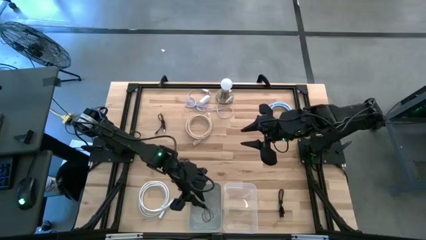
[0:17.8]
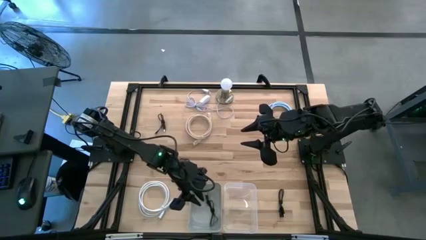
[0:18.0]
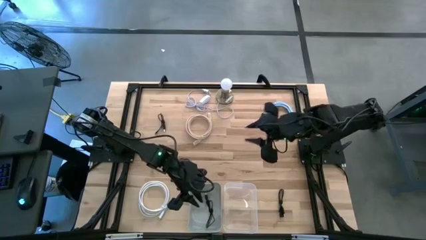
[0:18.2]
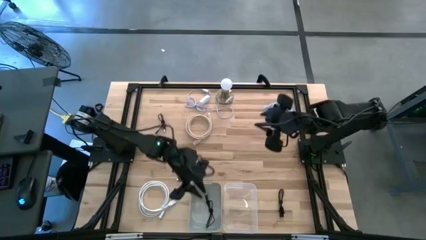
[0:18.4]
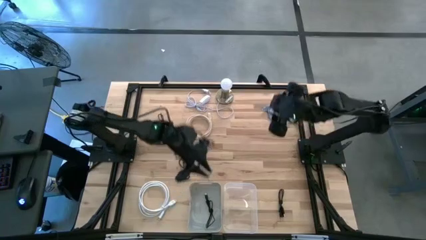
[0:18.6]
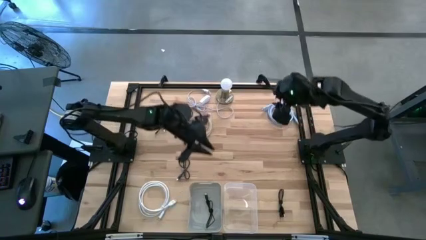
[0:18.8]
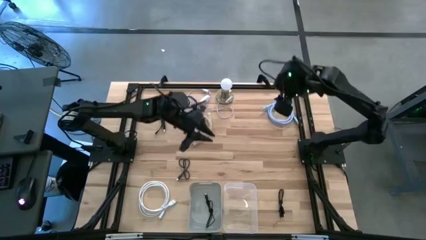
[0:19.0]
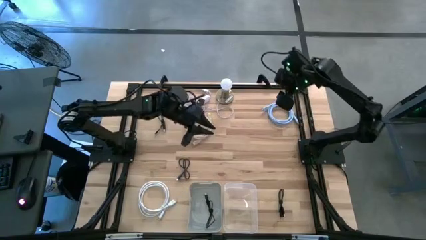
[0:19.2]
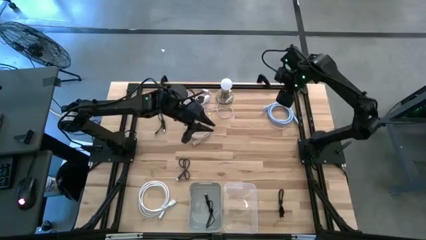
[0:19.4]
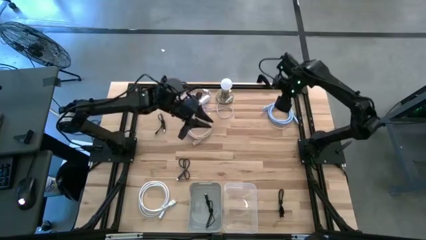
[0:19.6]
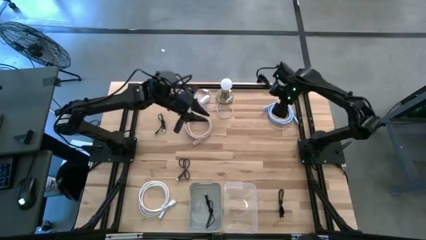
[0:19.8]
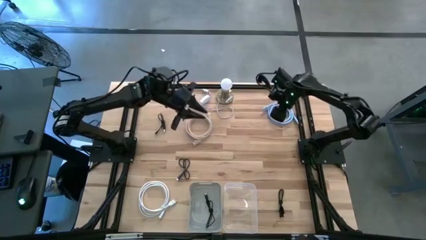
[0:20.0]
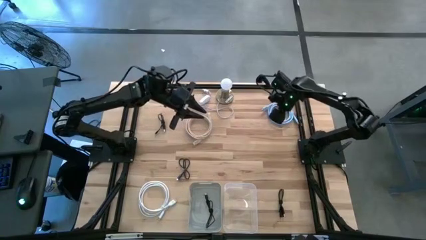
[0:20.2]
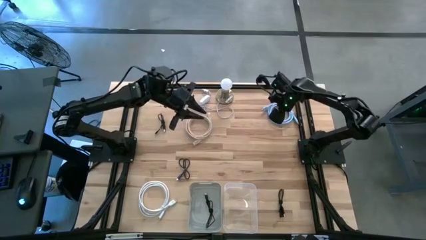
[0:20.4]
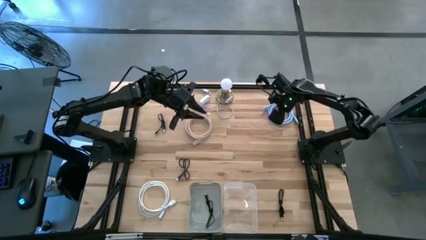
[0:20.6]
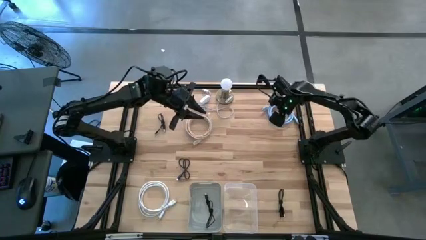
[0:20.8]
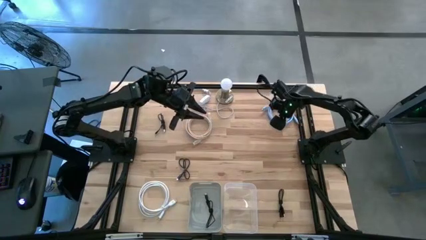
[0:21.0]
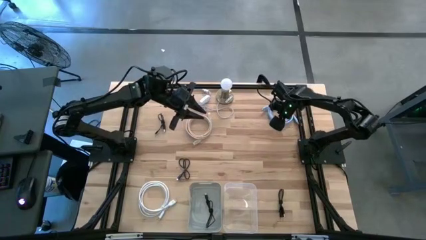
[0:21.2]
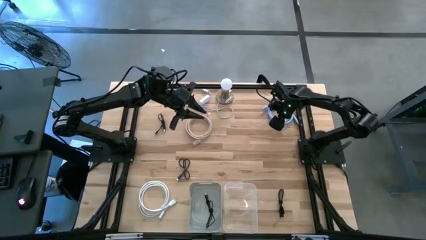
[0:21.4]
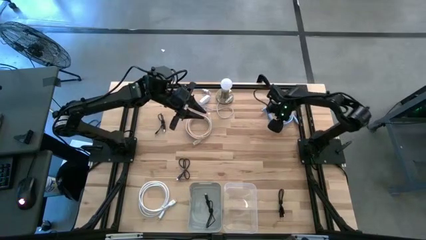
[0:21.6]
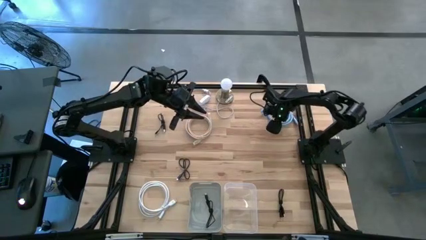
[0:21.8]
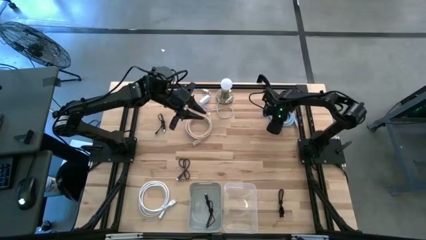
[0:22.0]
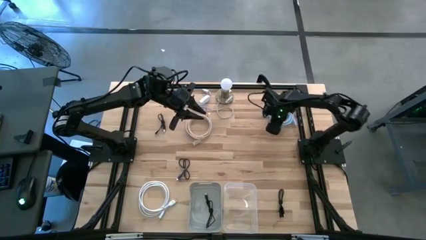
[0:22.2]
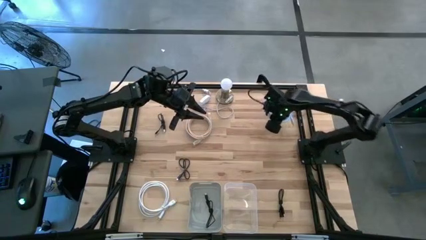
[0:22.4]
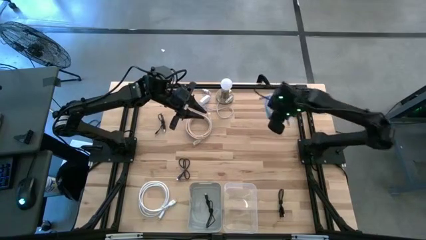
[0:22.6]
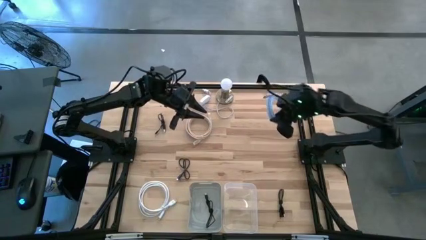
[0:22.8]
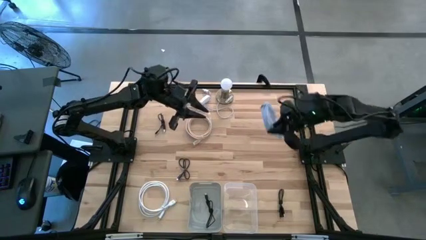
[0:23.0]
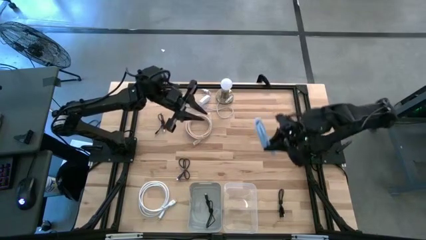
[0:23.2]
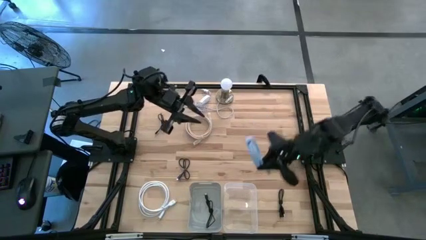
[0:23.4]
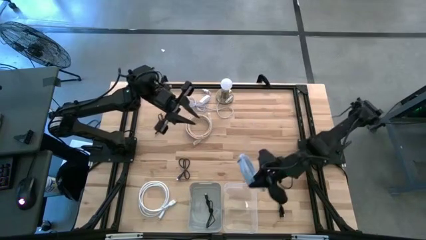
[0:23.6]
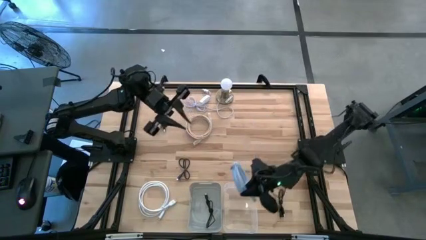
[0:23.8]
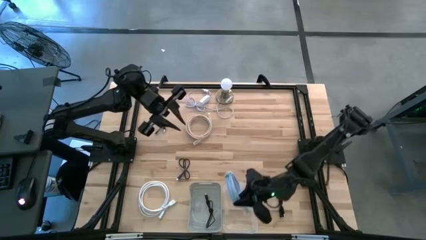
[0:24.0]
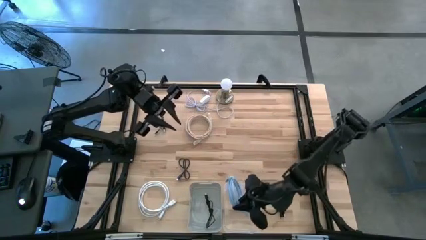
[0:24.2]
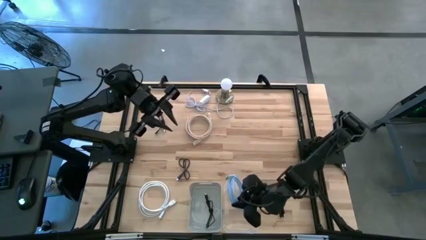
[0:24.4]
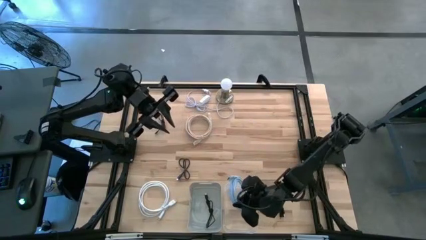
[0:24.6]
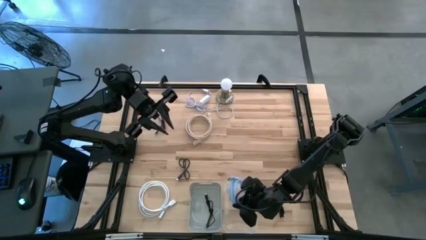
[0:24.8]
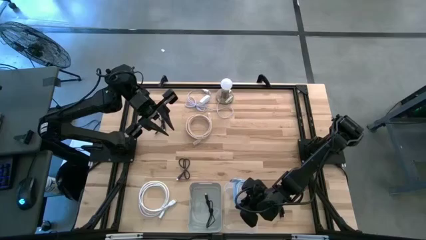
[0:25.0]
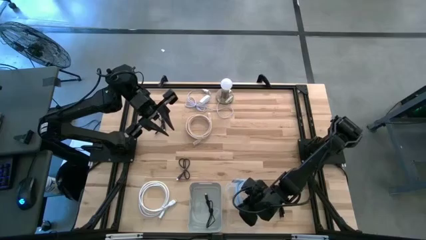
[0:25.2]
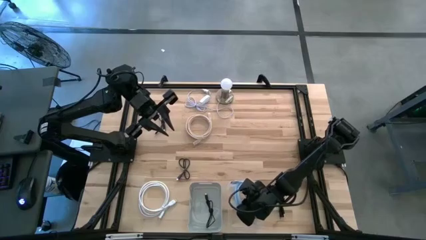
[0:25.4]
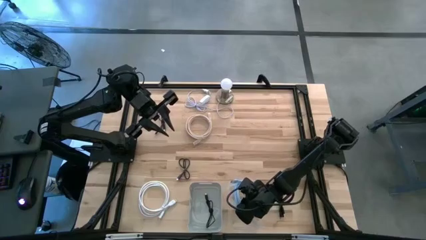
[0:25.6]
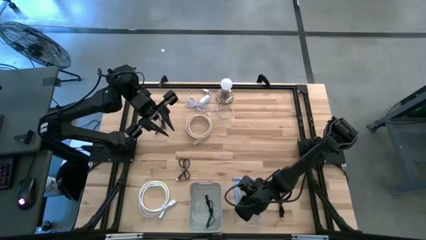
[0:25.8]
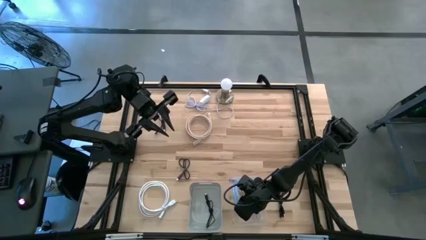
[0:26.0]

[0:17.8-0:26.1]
Task: Pick & Place USB Port
Put the blue HDMI cable into the transparent bin

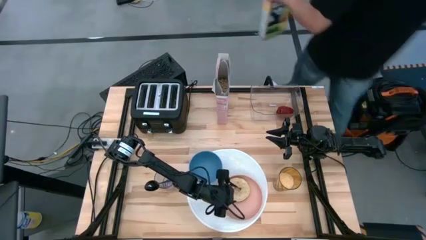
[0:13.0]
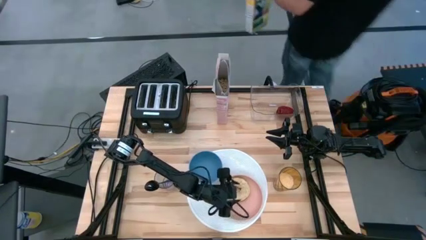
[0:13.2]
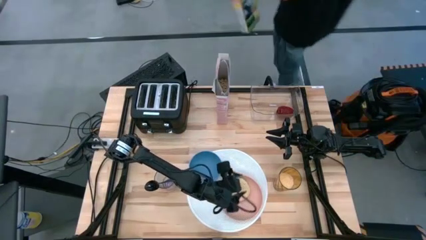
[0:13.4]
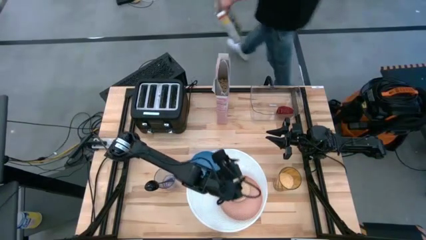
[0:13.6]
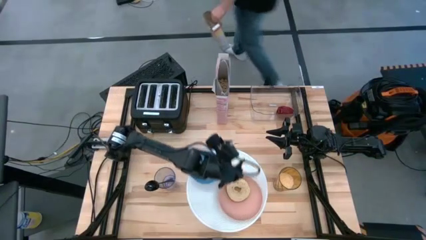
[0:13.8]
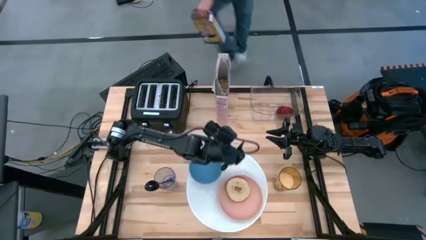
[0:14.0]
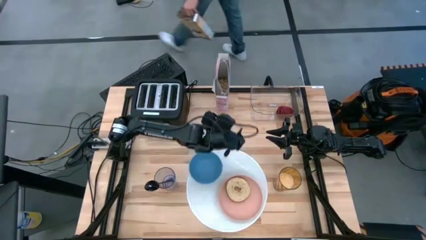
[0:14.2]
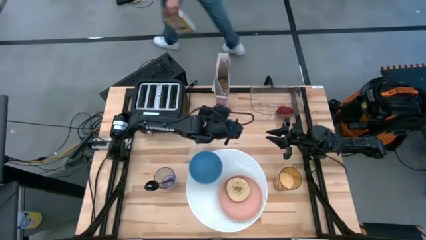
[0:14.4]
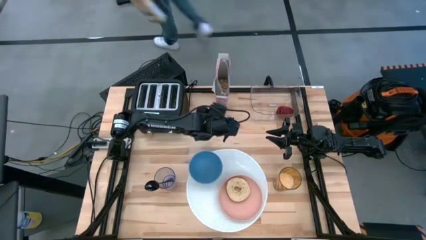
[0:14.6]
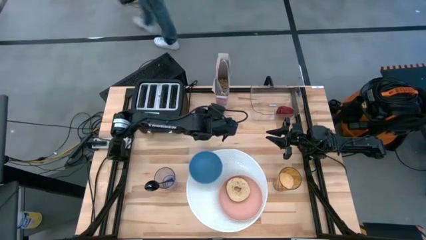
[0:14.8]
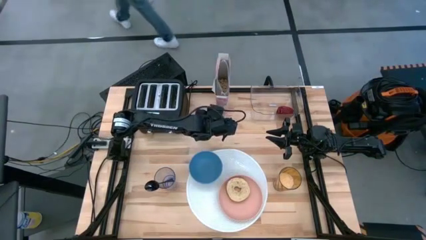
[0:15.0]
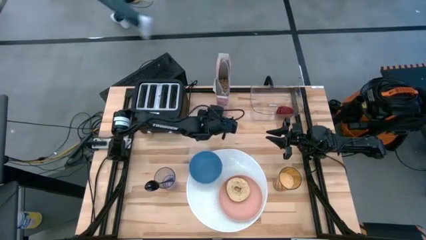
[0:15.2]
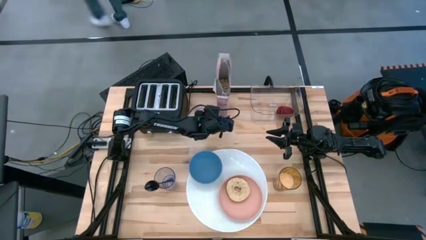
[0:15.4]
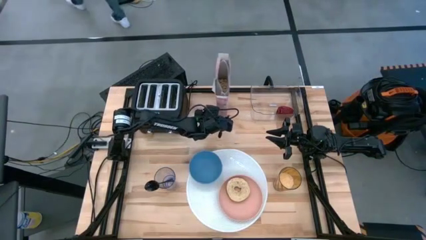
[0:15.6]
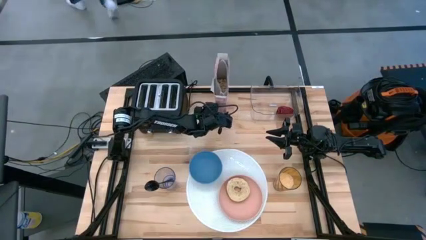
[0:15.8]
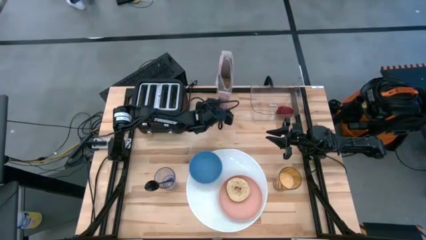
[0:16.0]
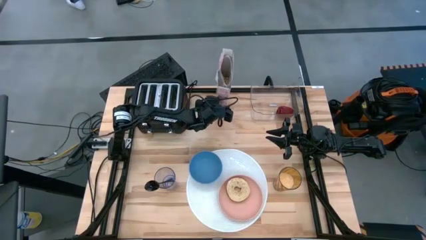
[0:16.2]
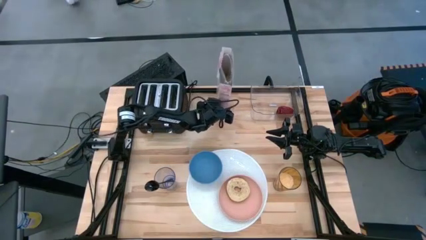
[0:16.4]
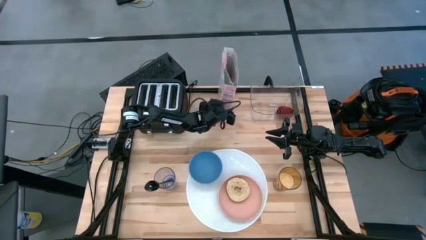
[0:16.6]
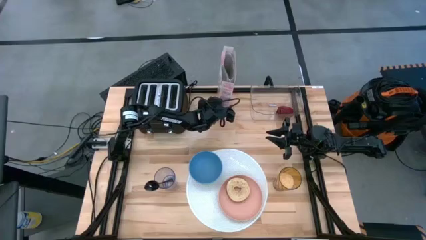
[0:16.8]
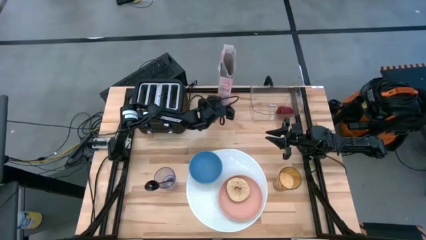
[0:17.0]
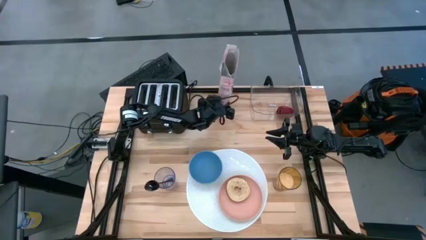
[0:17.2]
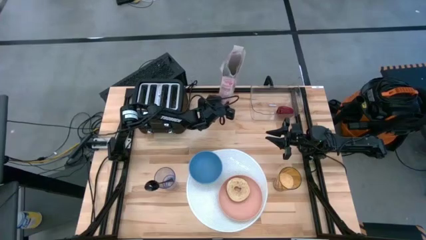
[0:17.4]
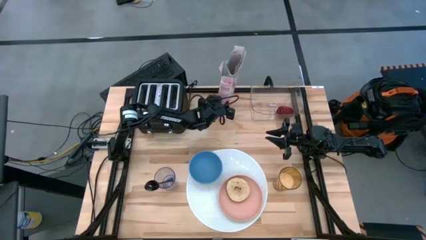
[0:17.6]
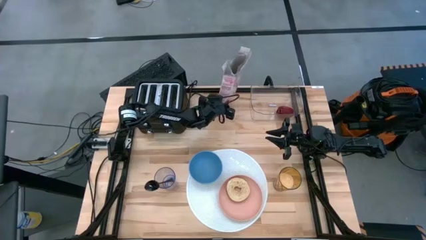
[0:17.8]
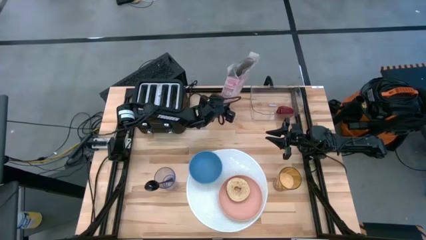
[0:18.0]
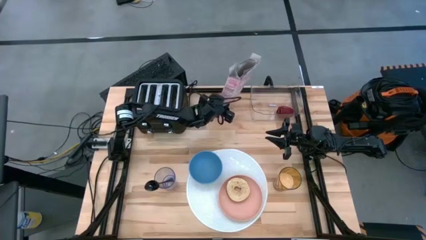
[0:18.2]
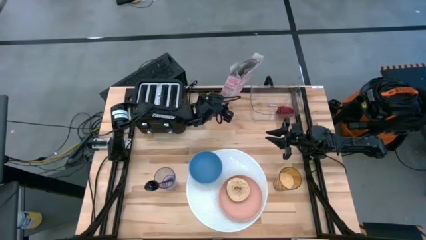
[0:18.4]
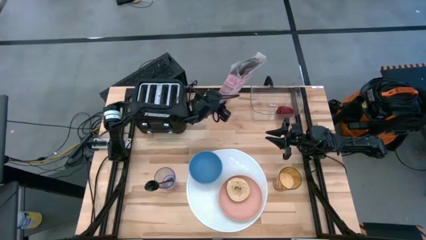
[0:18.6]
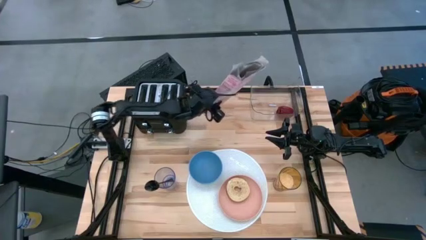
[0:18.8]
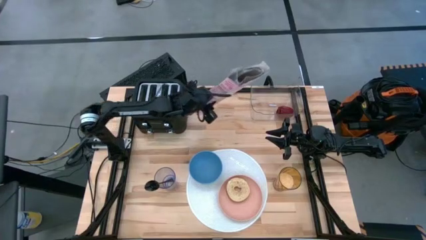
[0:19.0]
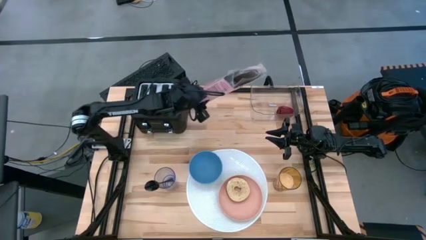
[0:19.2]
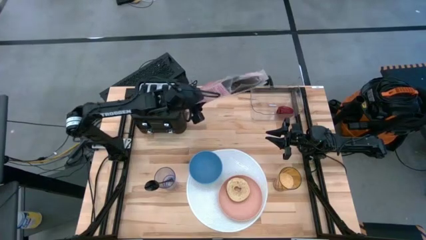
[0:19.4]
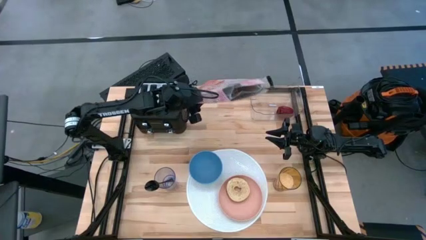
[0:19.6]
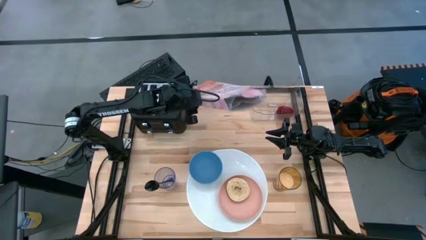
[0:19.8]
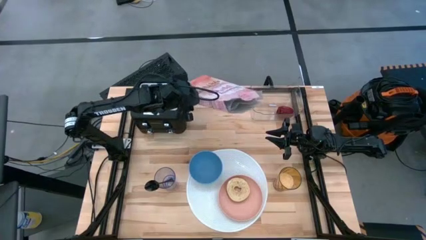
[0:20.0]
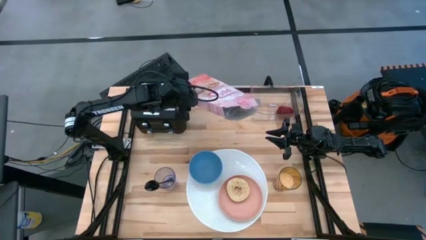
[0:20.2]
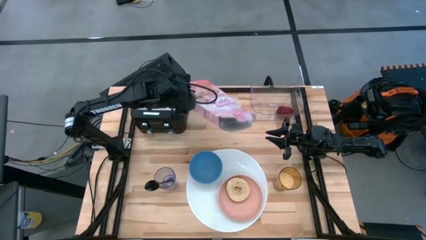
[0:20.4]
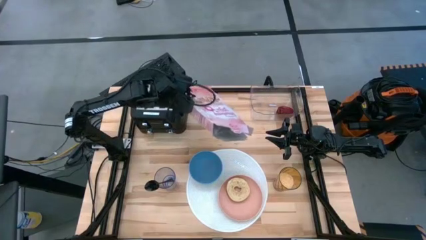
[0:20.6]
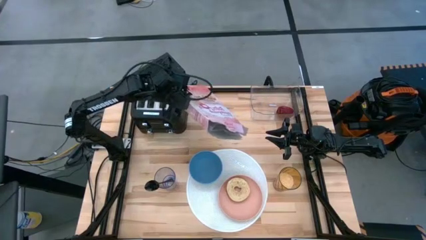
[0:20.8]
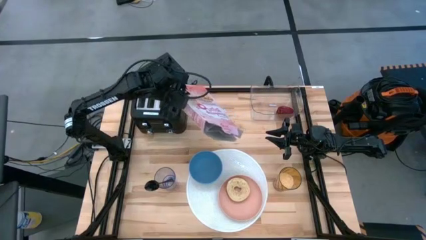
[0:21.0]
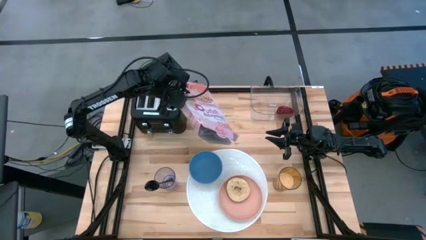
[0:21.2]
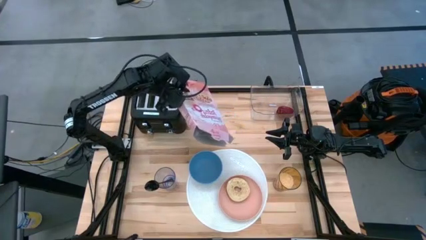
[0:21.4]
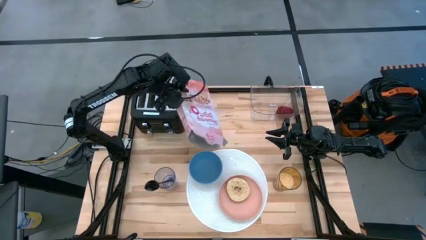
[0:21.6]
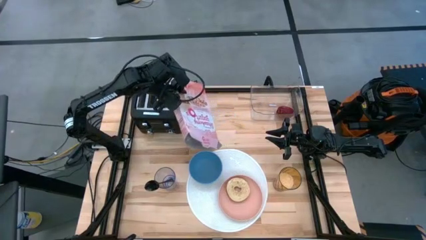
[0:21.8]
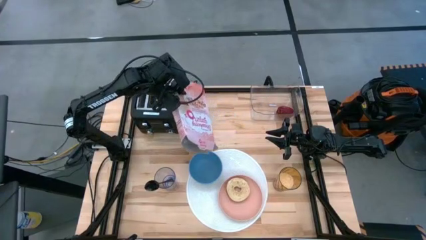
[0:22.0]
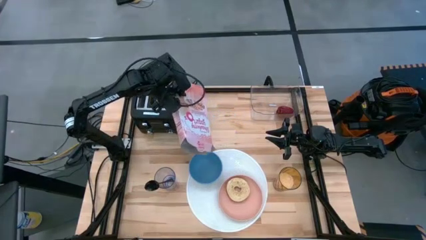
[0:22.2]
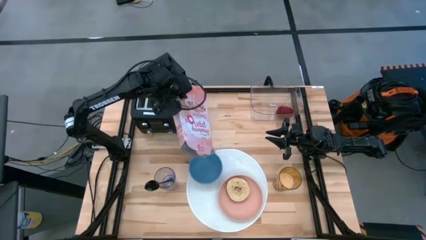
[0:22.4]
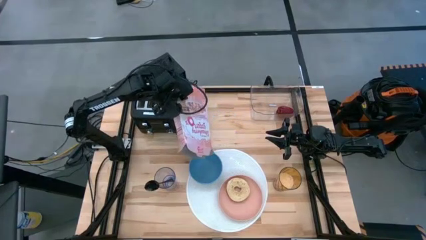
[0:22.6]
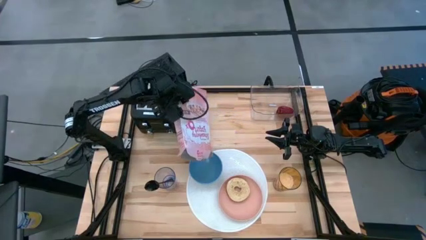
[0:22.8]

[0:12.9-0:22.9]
Task: Arrange a breakfast setting
Pour the cereal from the cereal box into the blue bowl
